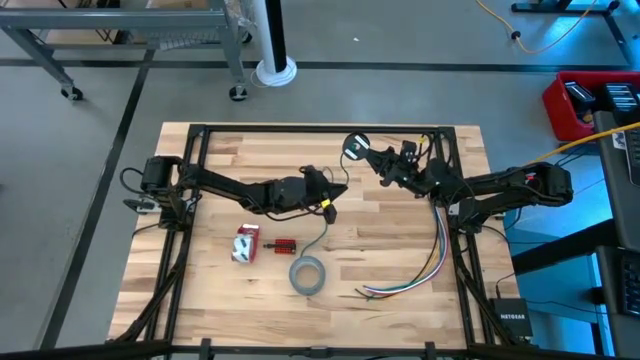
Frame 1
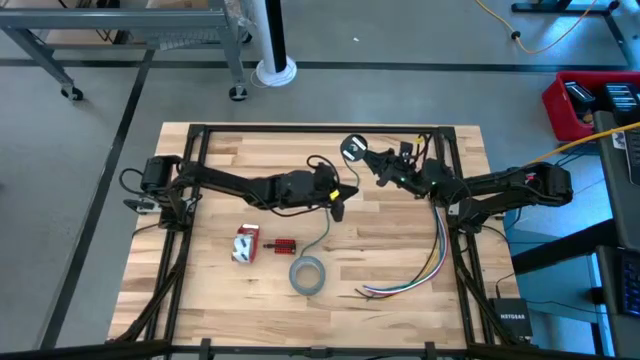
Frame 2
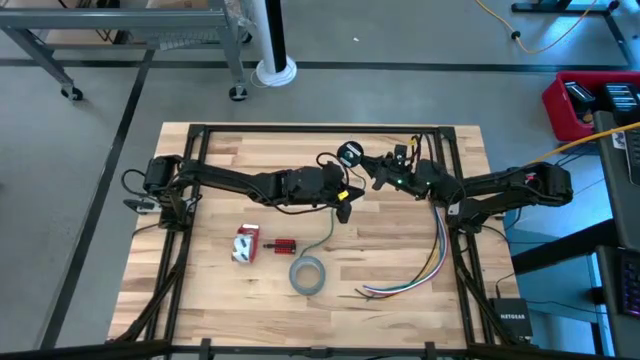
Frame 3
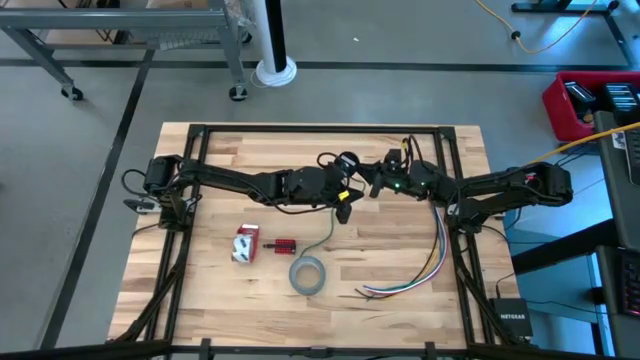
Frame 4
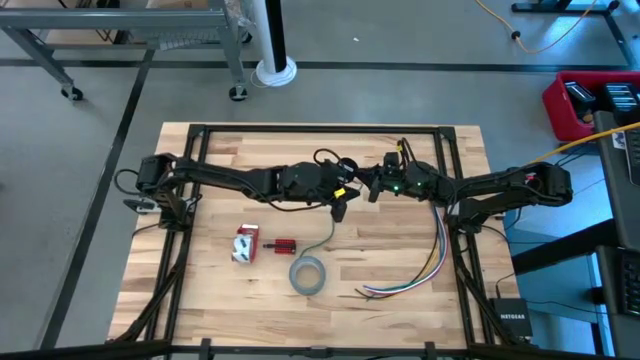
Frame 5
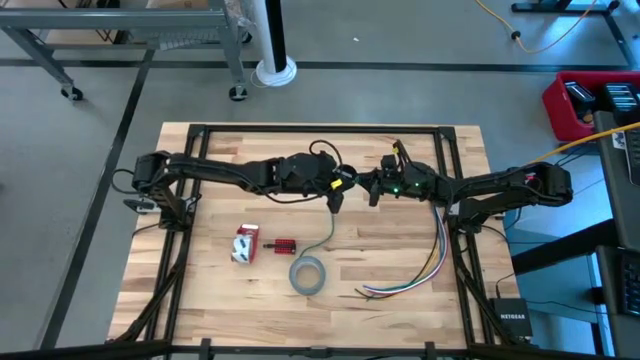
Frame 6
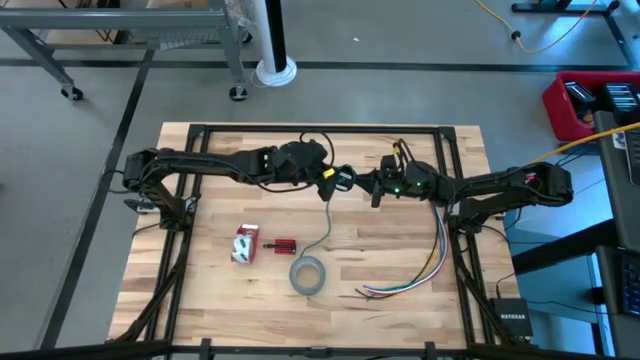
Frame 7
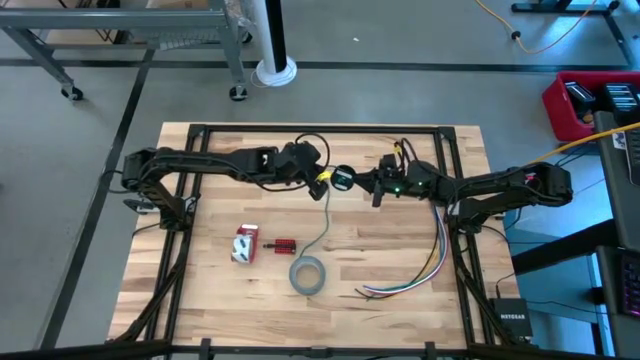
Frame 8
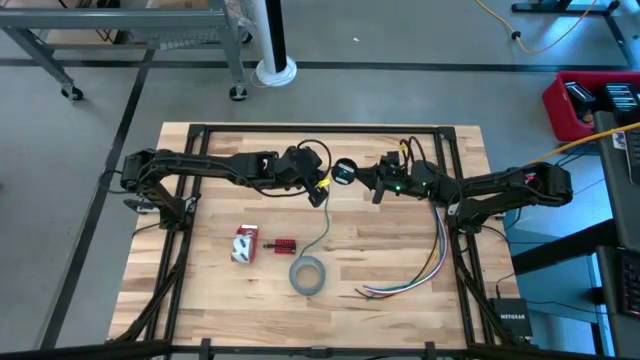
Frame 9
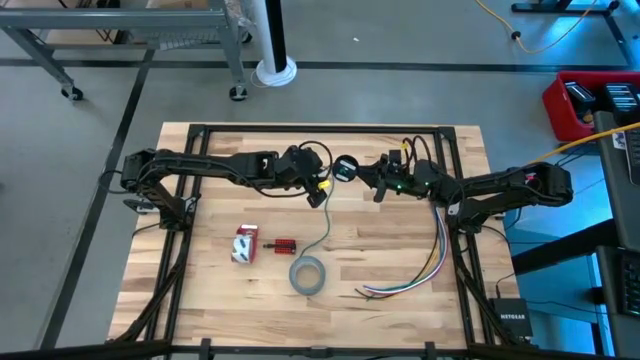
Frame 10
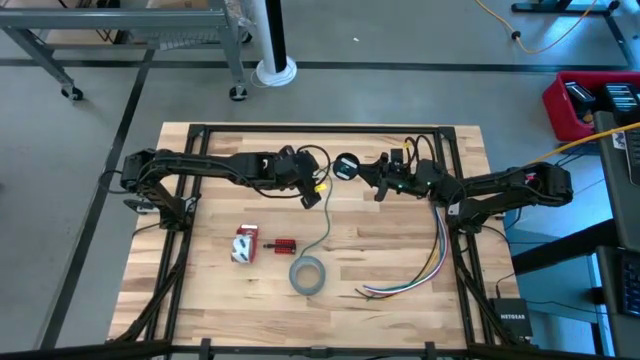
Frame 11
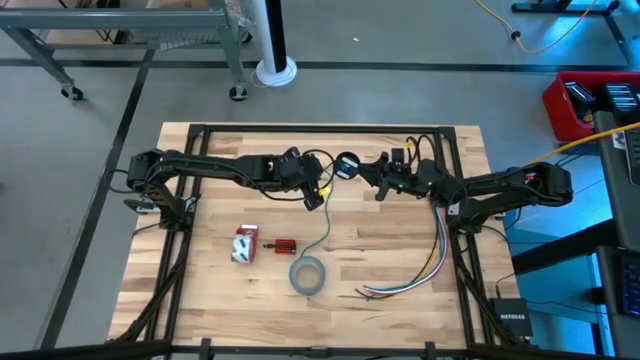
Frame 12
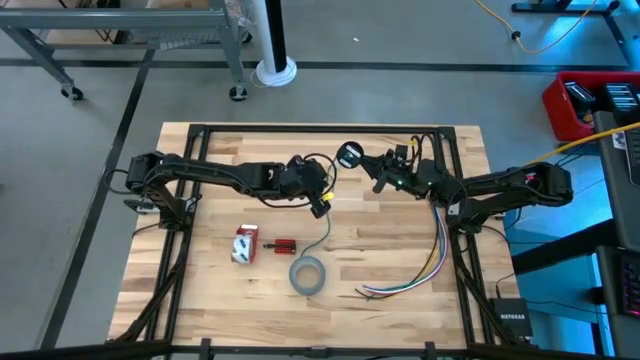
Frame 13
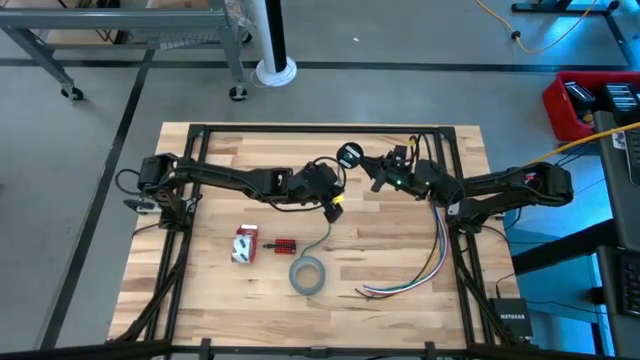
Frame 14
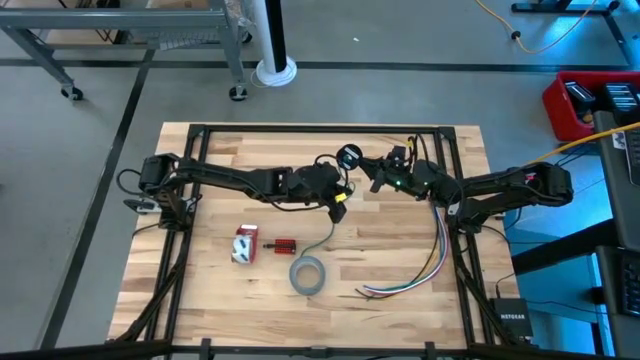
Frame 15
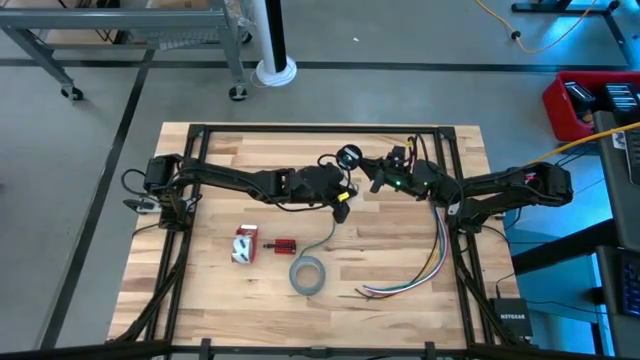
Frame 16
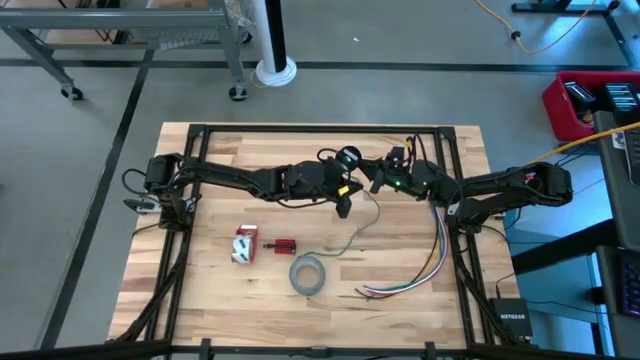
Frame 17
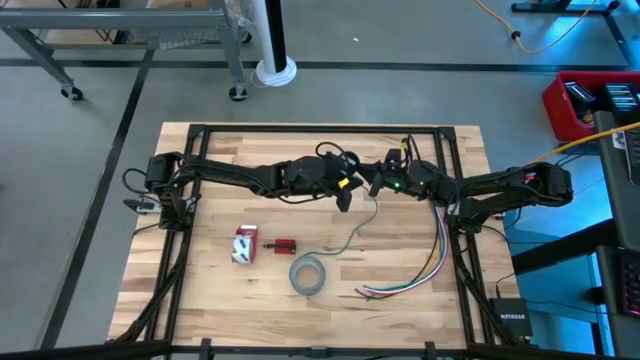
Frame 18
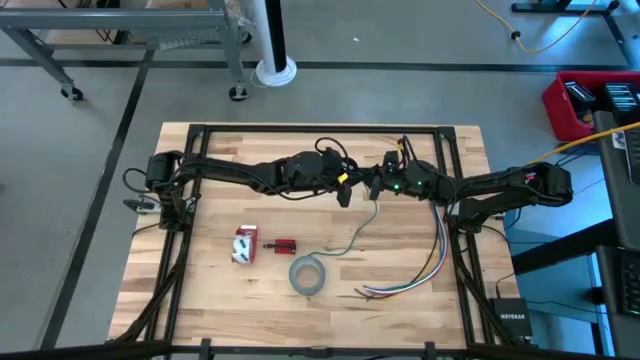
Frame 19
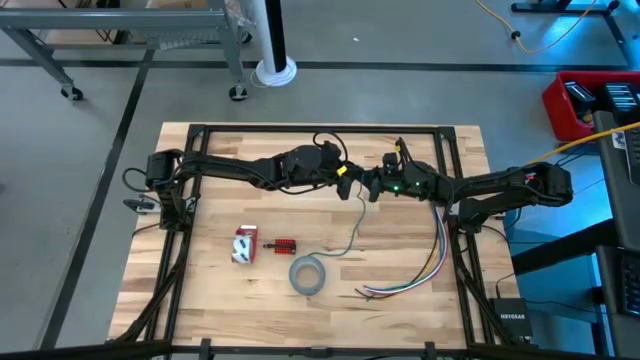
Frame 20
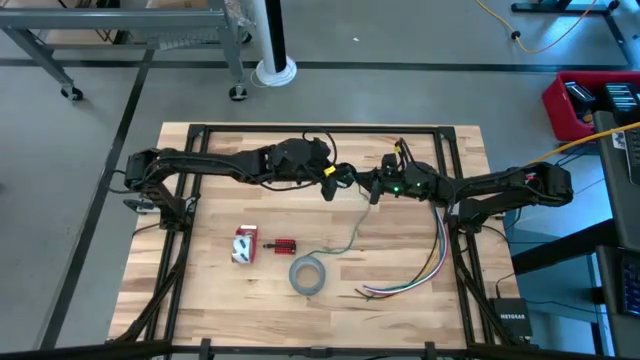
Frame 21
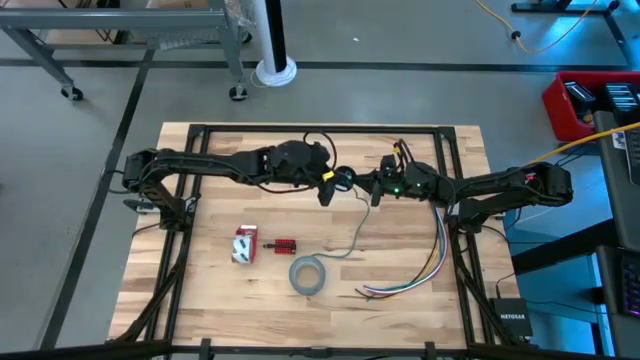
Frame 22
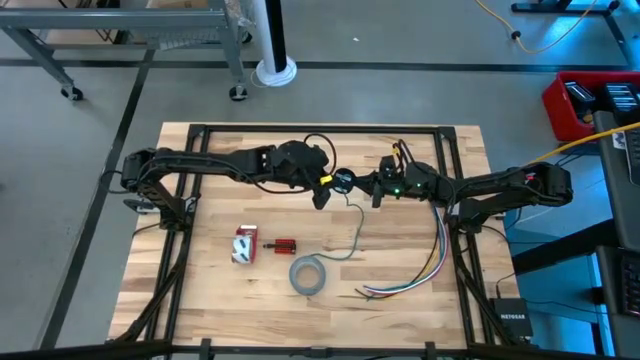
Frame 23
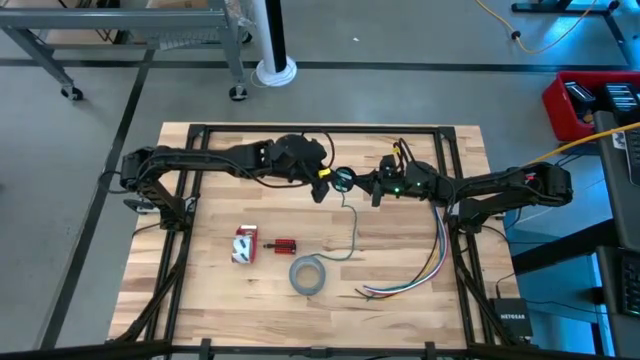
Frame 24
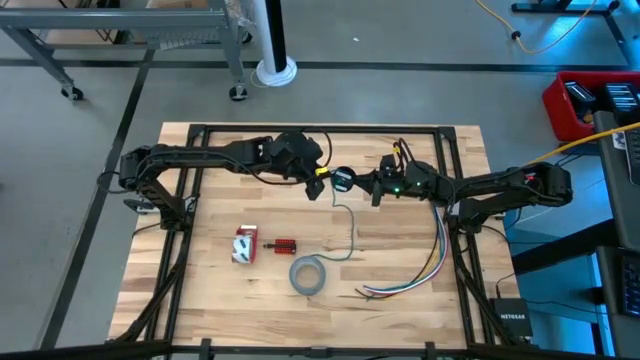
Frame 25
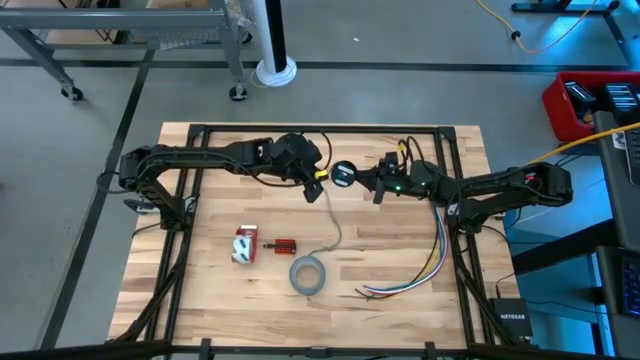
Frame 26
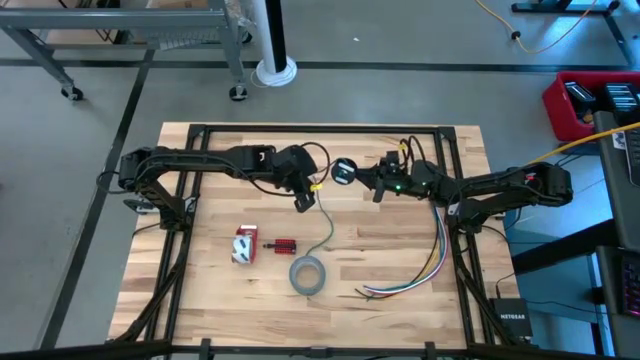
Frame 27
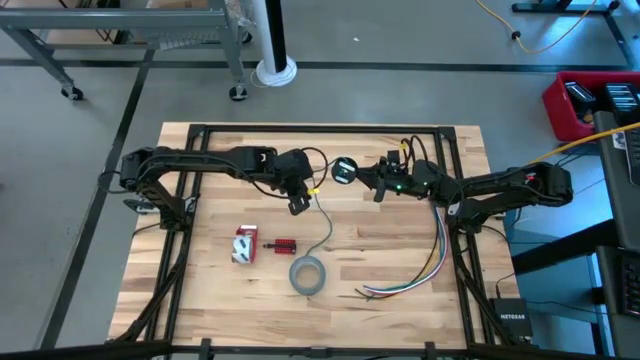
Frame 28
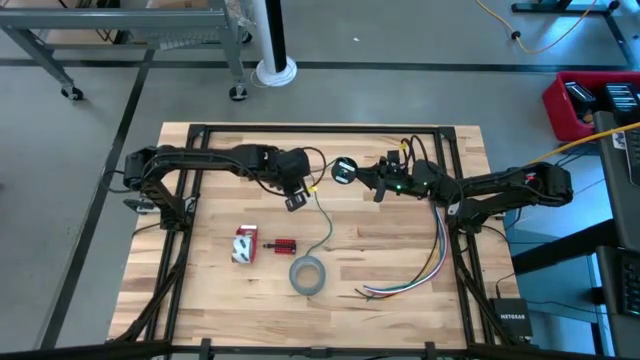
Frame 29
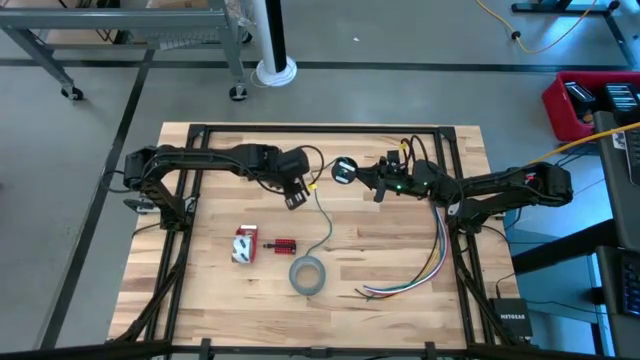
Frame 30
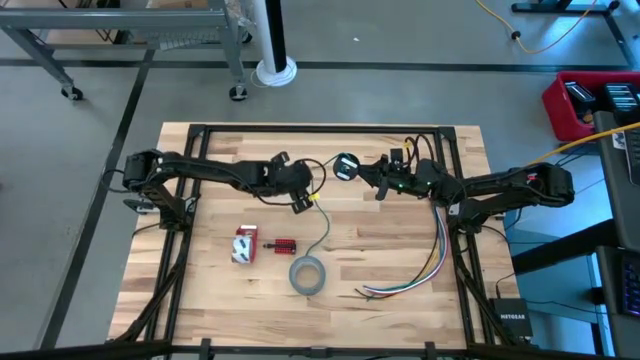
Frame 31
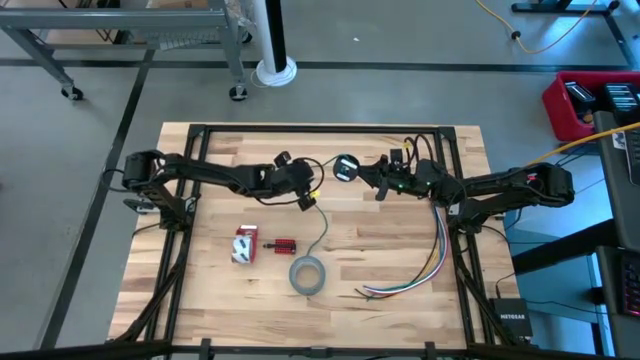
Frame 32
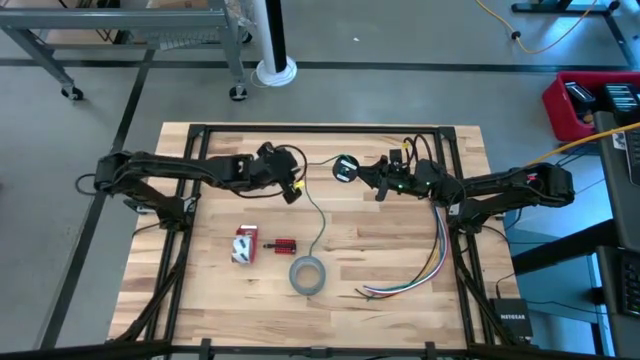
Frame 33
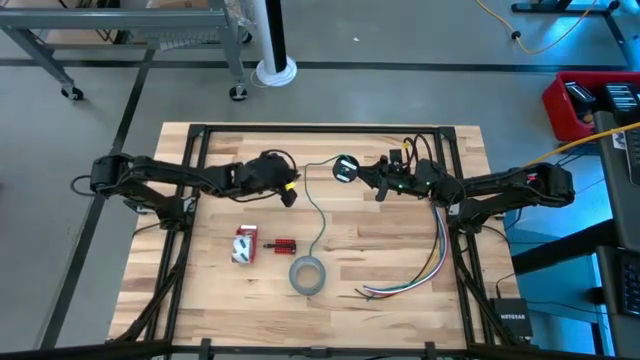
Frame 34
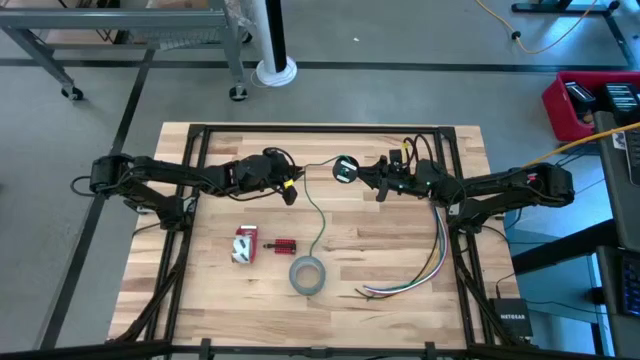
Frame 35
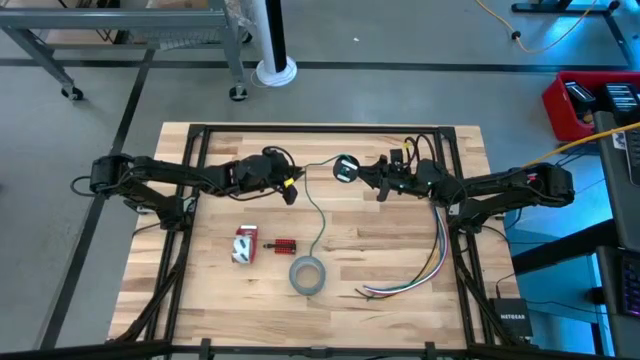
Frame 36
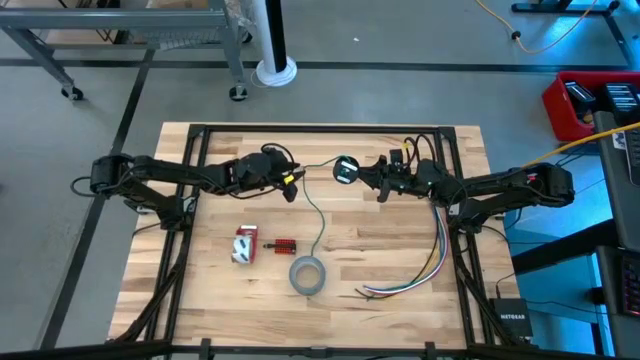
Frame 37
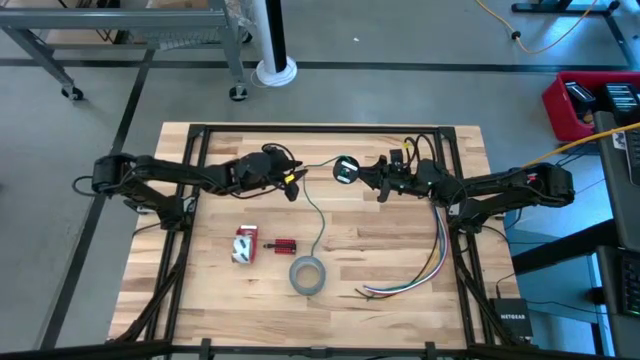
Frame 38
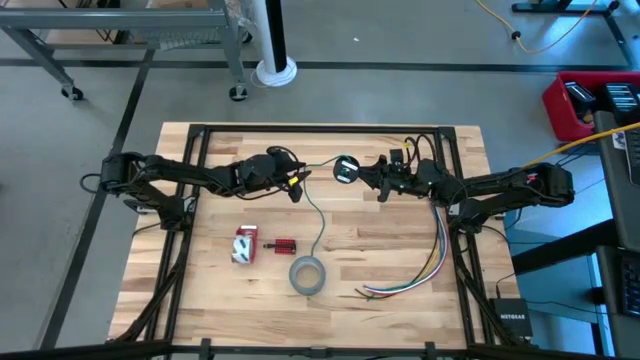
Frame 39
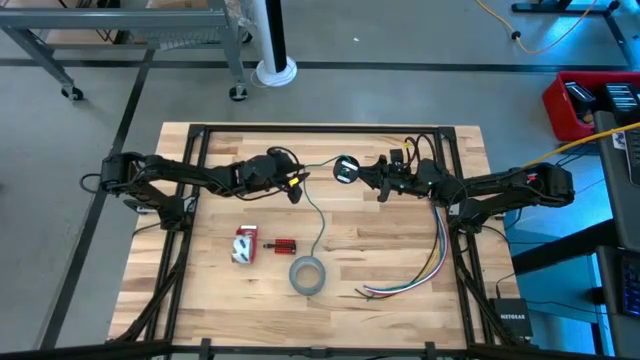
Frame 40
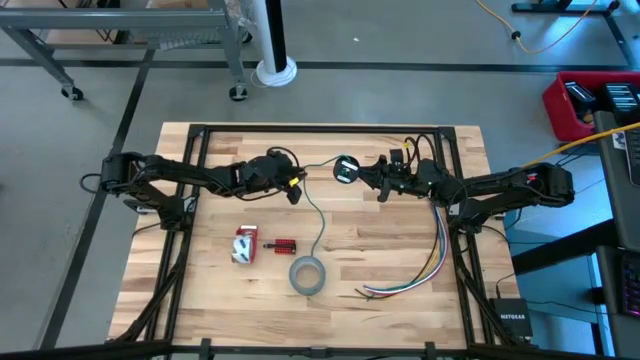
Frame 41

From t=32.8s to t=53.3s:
Task: Coil cords
Coil the green wire onto the spool
